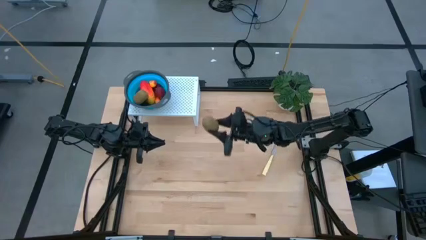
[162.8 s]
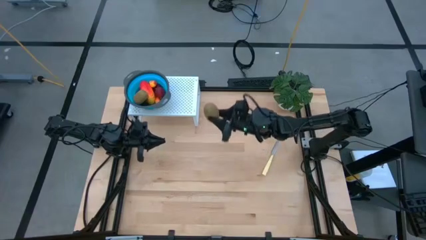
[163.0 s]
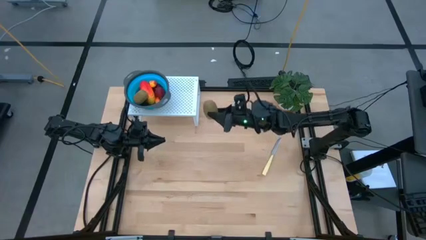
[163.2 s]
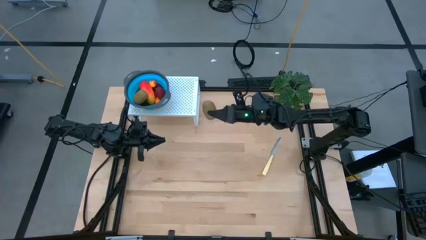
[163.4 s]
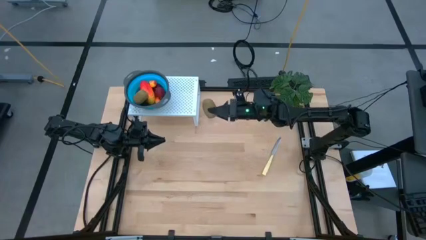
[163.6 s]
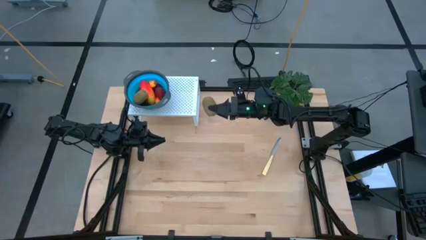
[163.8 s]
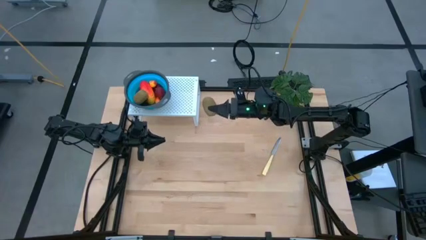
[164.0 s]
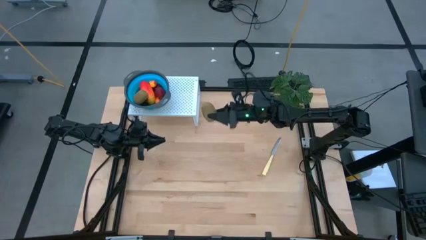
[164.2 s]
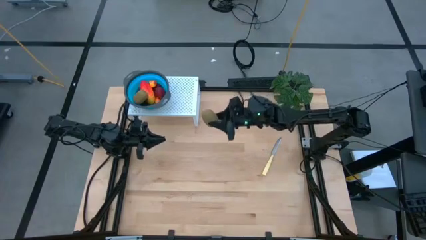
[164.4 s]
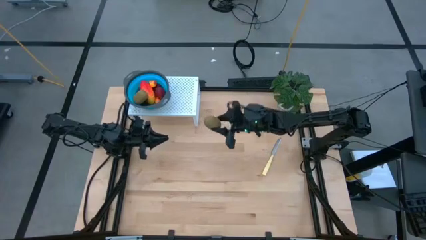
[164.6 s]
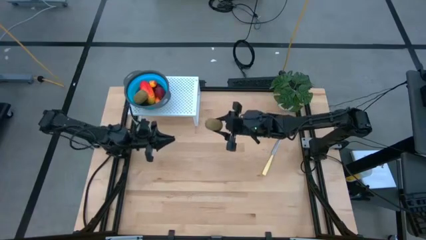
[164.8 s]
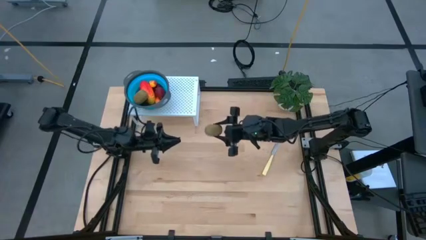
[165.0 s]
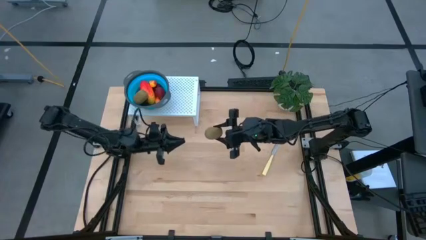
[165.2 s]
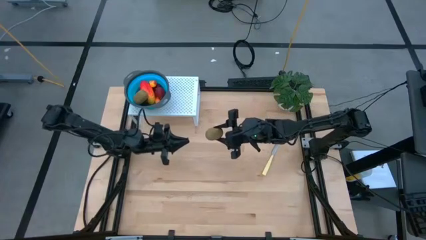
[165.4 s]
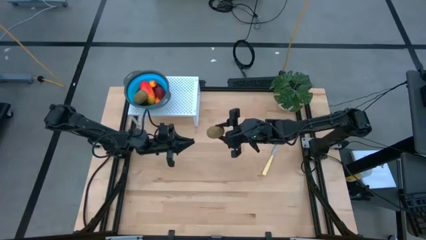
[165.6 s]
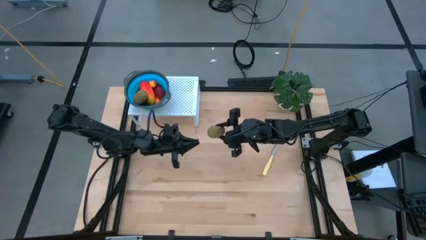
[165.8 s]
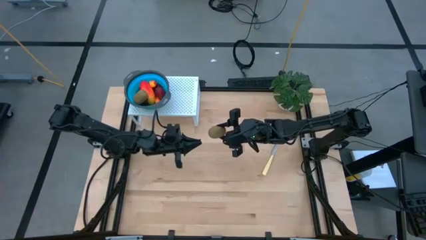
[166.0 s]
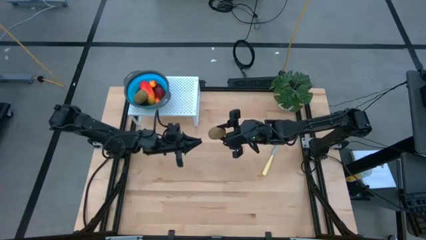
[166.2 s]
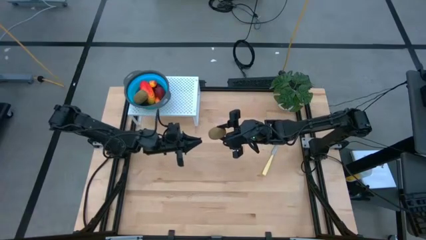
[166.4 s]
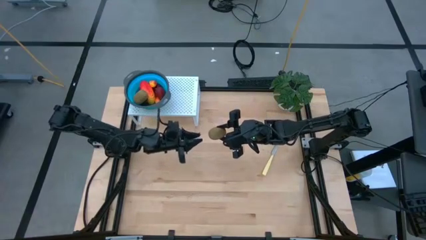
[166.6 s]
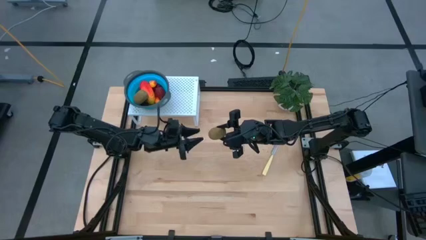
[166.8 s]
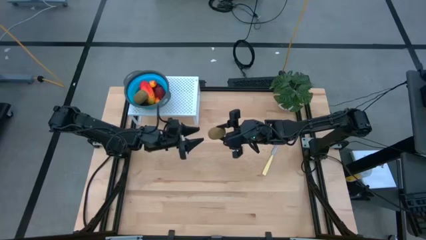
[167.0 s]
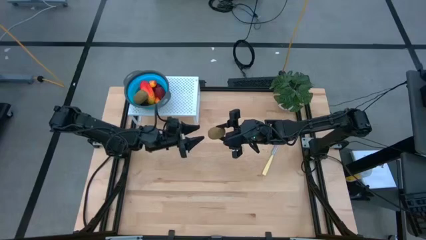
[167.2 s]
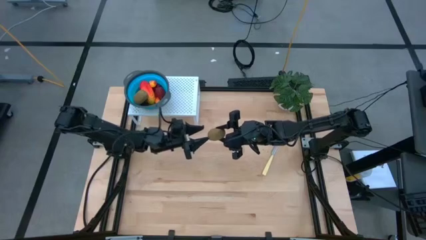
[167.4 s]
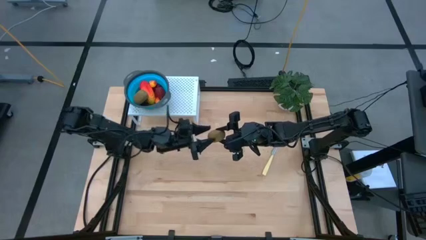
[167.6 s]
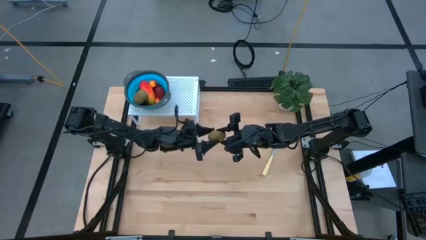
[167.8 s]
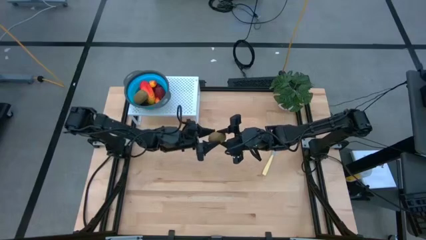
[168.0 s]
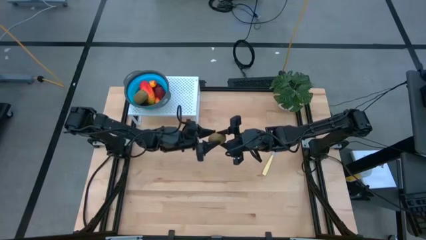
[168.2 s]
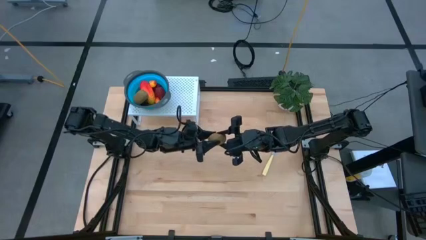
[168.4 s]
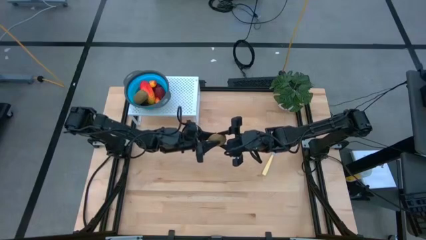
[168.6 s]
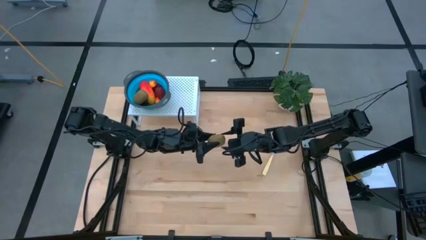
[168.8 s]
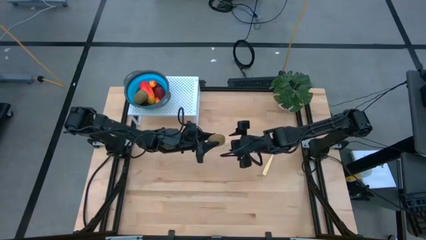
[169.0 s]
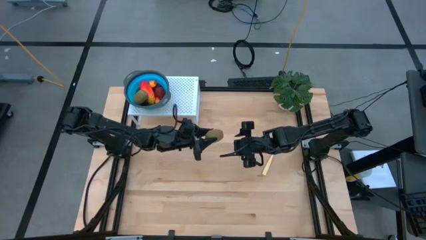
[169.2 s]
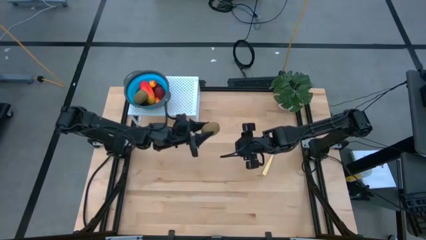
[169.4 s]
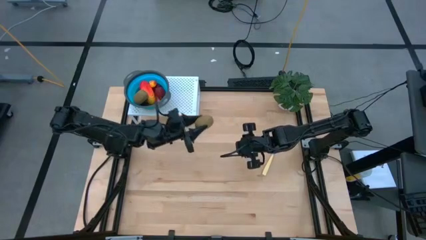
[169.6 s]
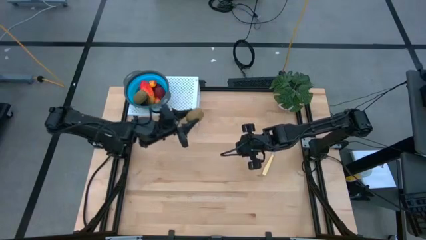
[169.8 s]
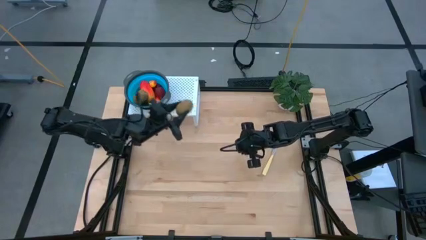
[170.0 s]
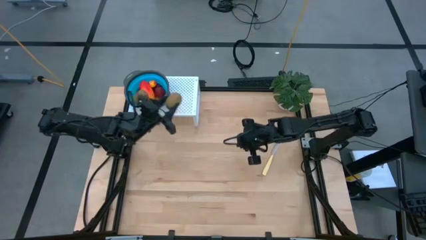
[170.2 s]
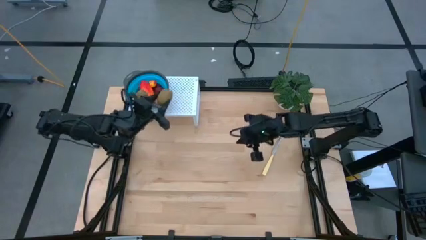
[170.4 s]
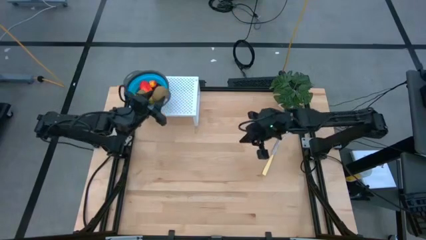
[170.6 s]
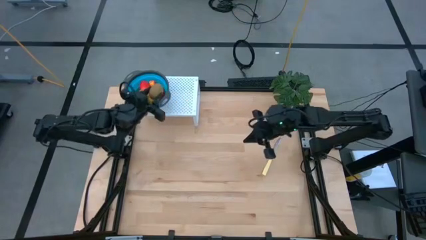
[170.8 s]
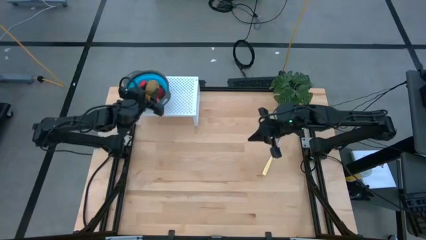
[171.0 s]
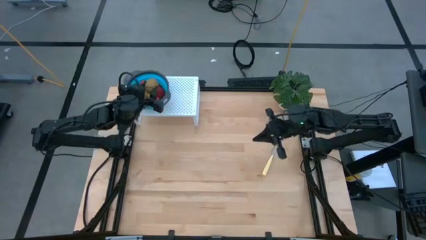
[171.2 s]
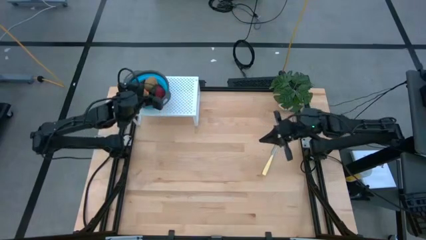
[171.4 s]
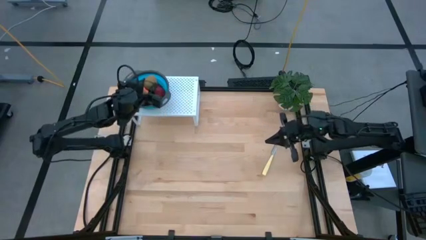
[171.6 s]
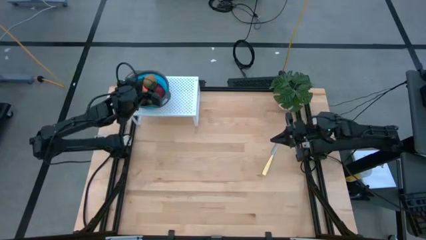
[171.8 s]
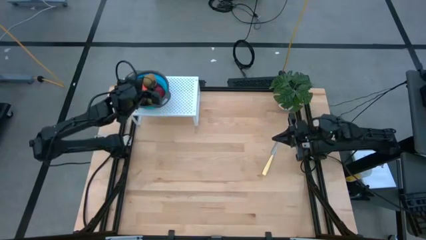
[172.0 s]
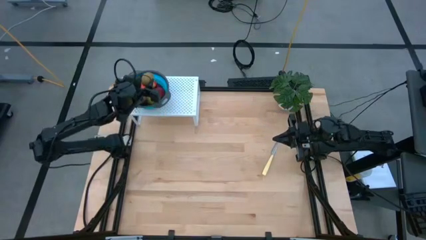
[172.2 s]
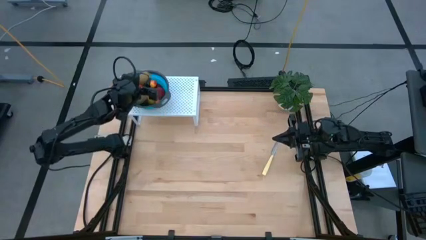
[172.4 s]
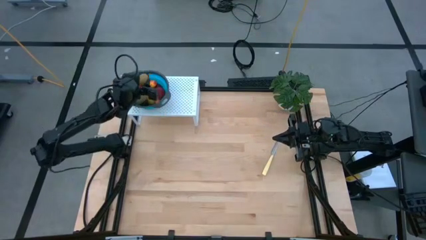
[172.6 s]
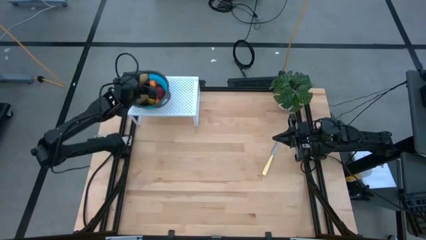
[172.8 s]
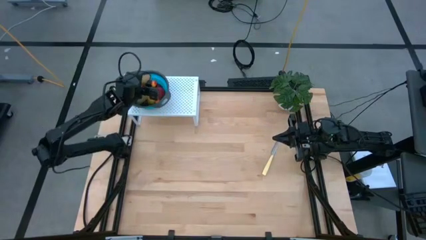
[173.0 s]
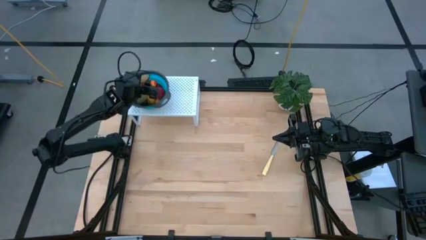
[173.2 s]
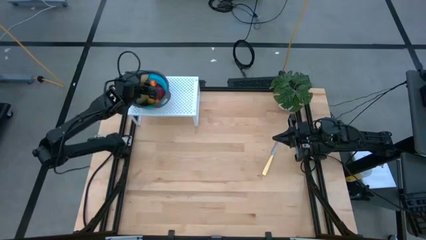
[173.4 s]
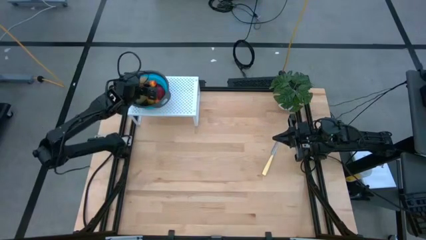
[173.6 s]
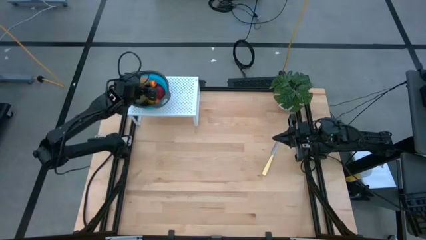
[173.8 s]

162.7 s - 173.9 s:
Task: Pick & Place Fruit
Put the kiwi into the blue strainer bowl on the shelf

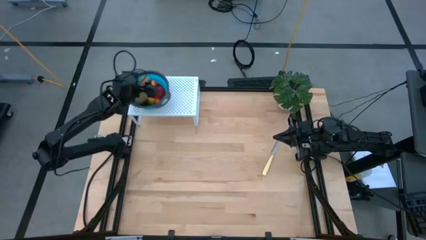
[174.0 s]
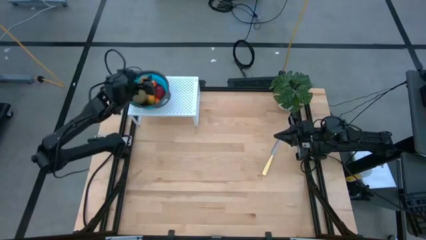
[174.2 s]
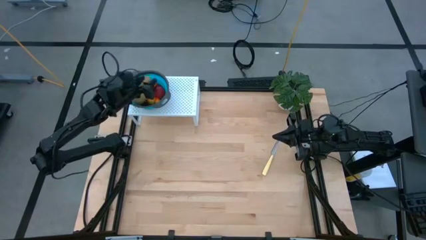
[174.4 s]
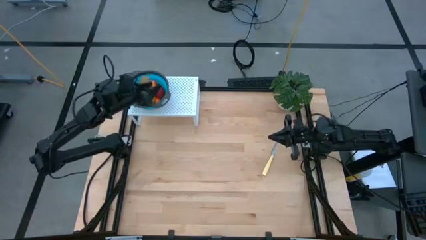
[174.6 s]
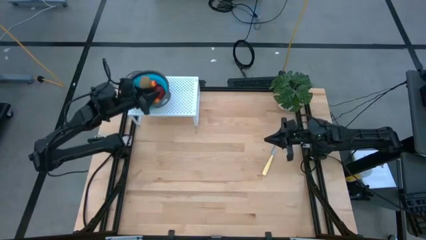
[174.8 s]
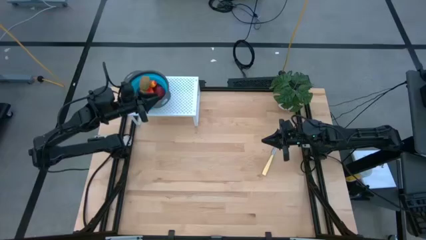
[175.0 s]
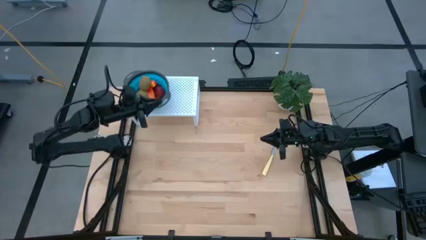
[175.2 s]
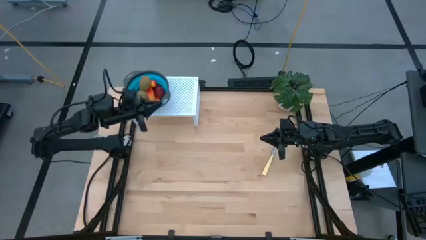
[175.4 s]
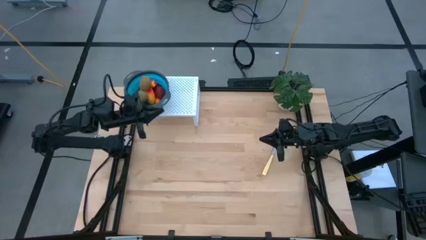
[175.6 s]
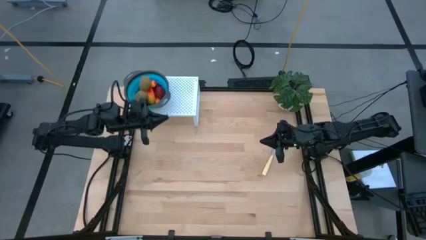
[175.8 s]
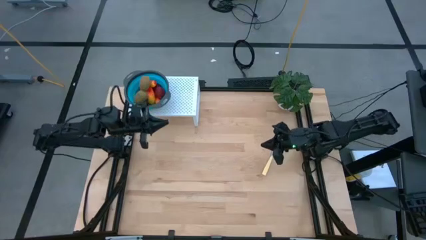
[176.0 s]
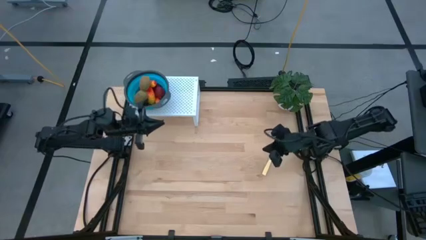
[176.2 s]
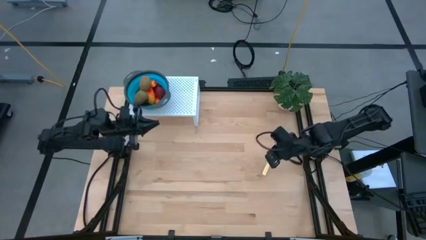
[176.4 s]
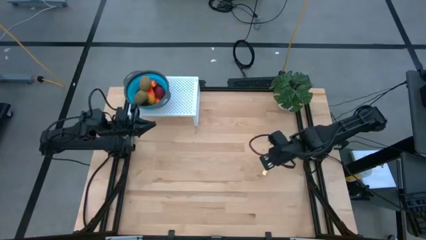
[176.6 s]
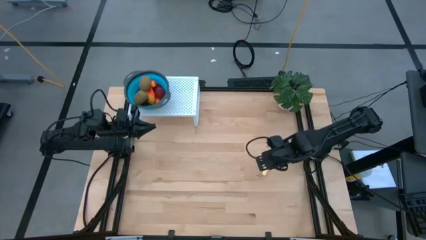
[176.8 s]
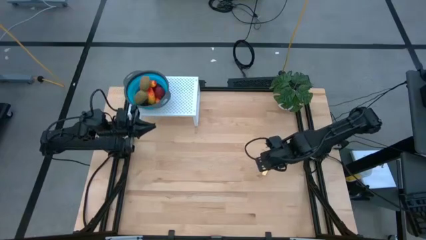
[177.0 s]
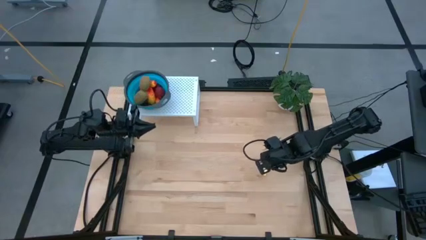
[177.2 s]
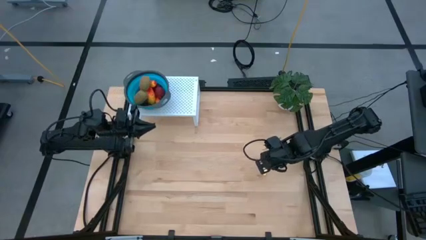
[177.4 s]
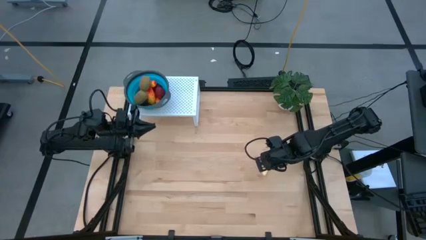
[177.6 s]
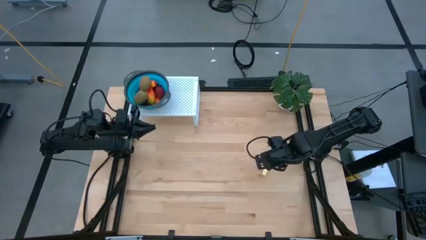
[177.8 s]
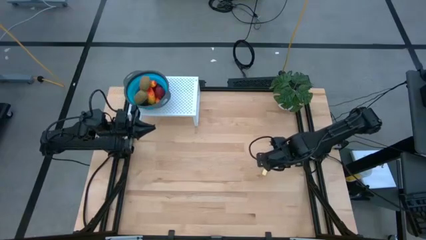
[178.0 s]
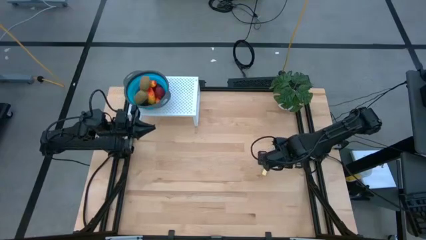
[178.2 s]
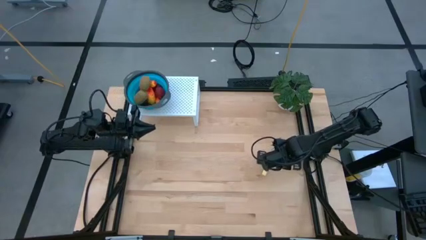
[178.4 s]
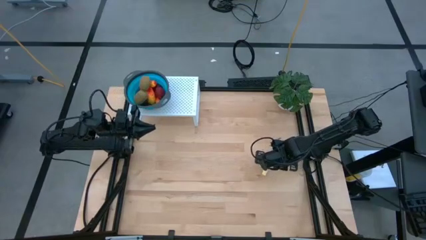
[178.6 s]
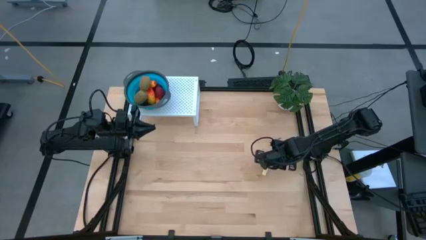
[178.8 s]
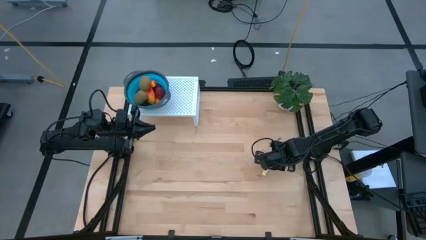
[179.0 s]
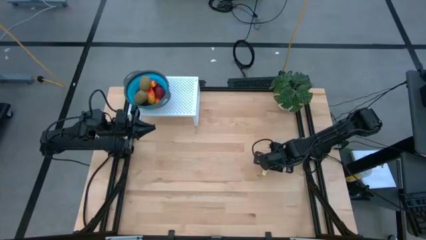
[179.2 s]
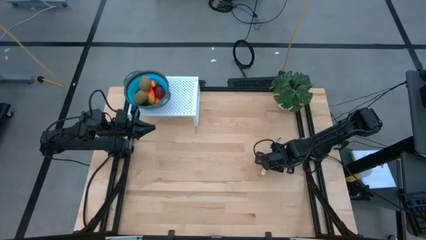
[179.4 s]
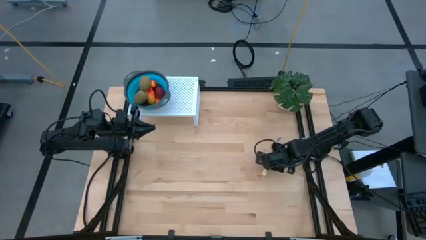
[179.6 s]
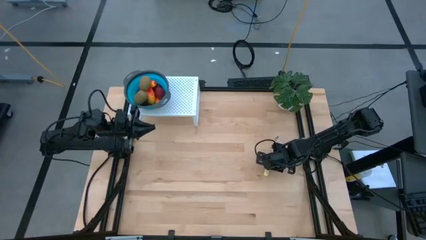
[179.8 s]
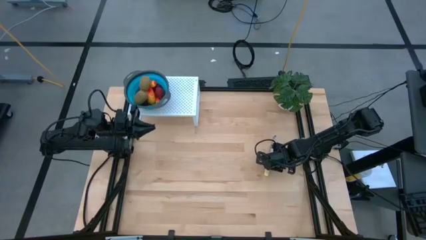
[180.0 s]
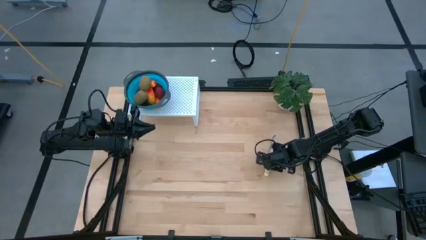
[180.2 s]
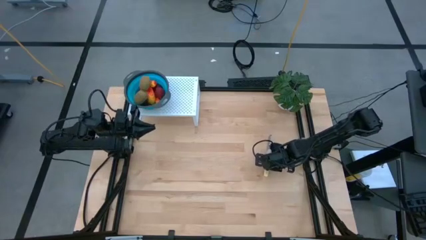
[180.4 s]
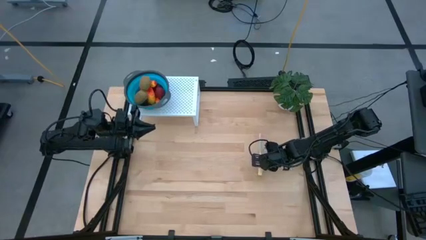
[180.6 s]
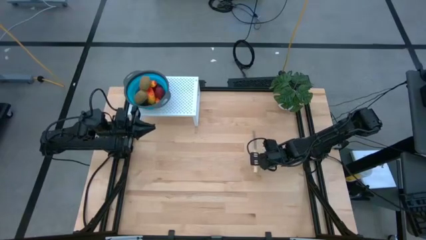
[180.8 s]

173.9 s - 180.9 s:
Put the butter knife into the right side of the blue strainer bowl on the shelf
